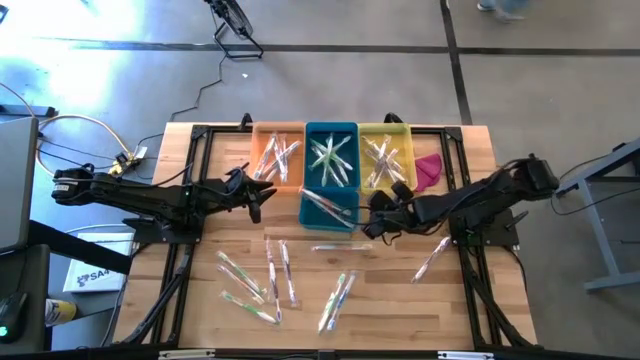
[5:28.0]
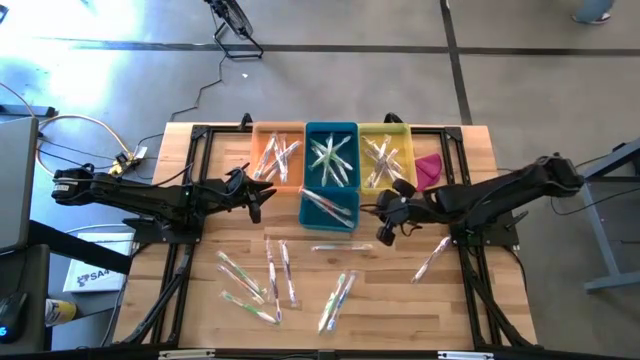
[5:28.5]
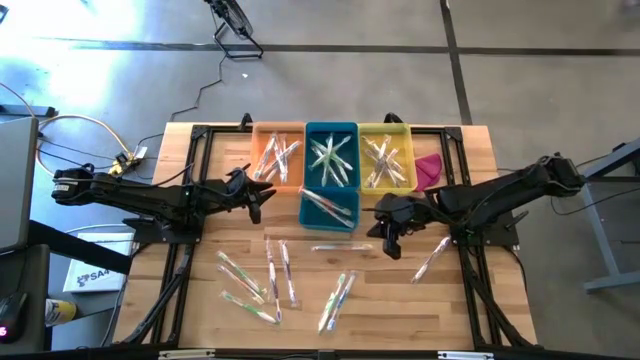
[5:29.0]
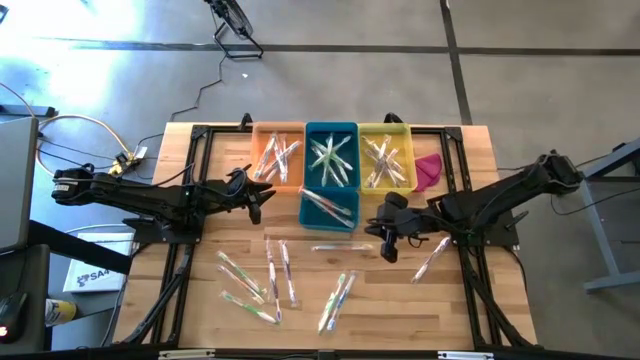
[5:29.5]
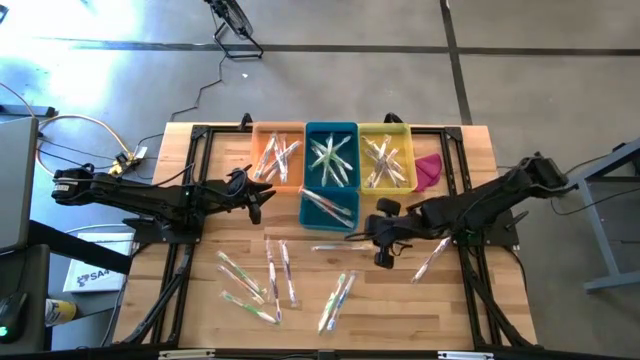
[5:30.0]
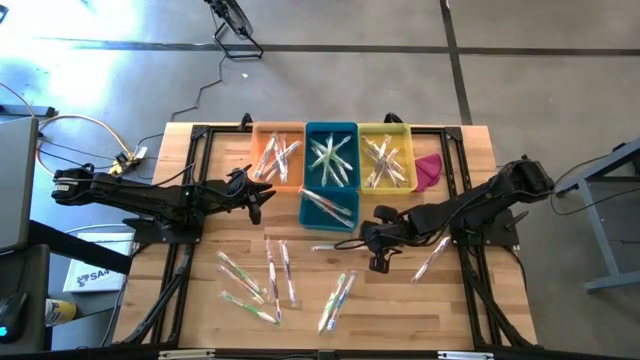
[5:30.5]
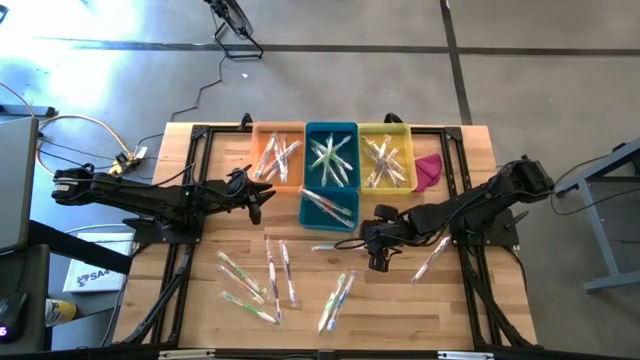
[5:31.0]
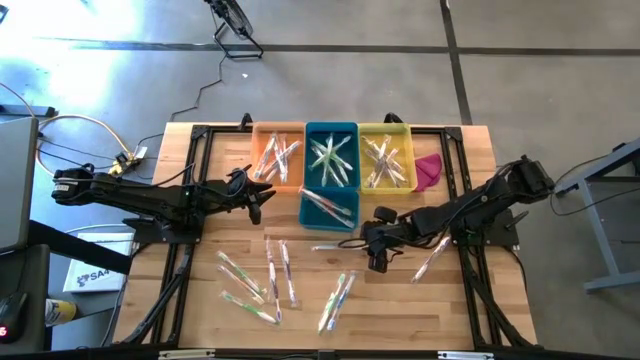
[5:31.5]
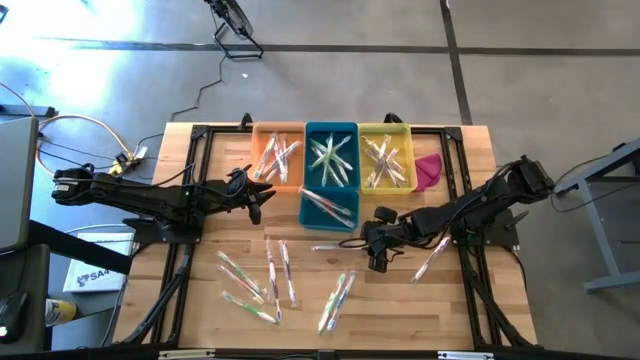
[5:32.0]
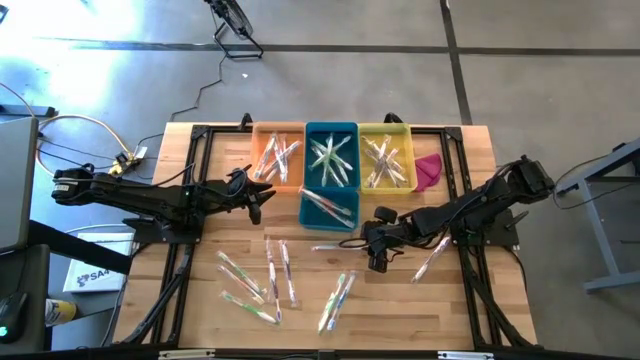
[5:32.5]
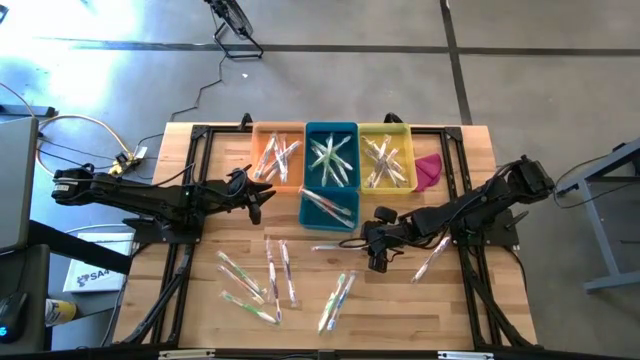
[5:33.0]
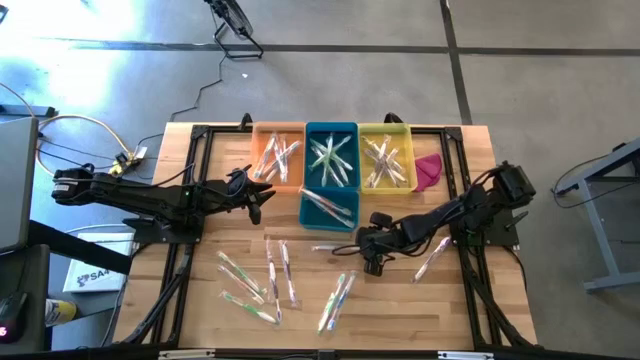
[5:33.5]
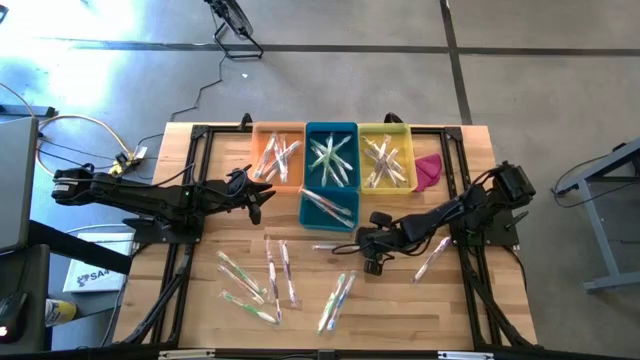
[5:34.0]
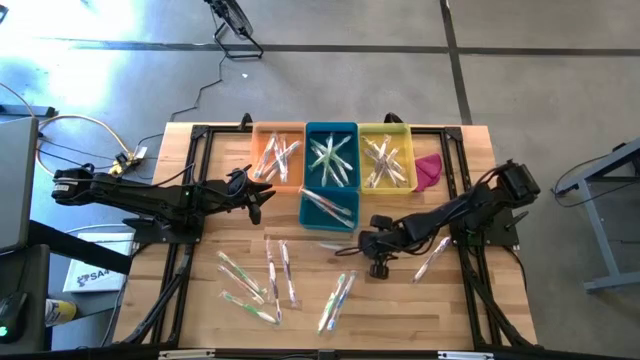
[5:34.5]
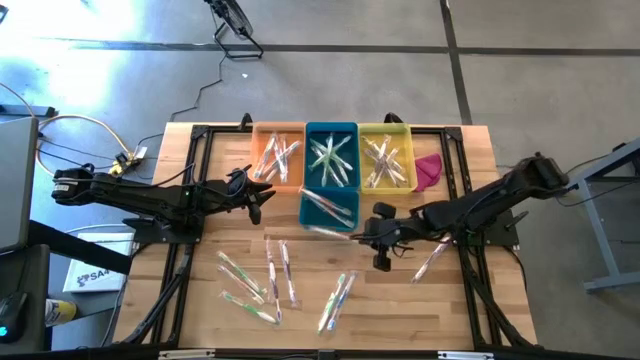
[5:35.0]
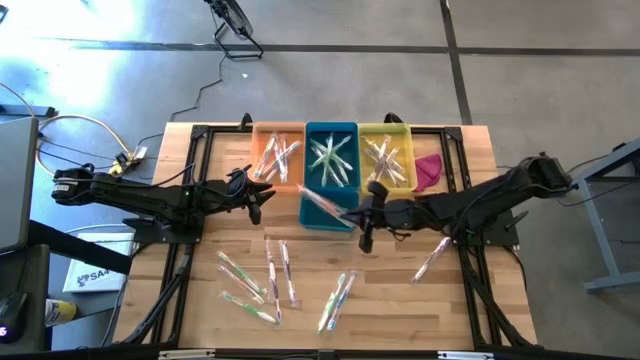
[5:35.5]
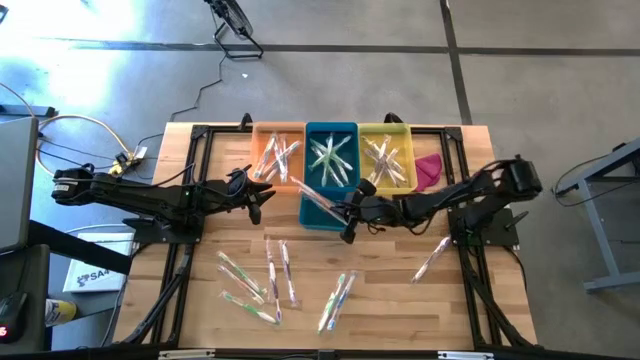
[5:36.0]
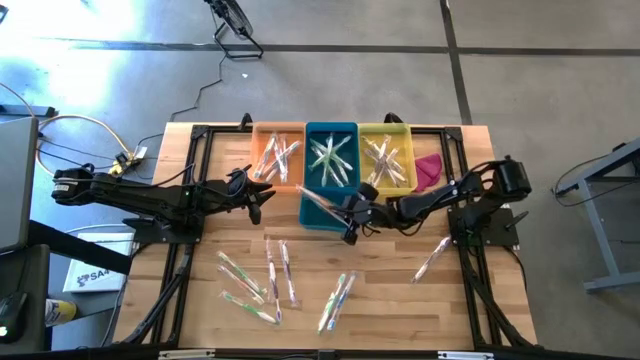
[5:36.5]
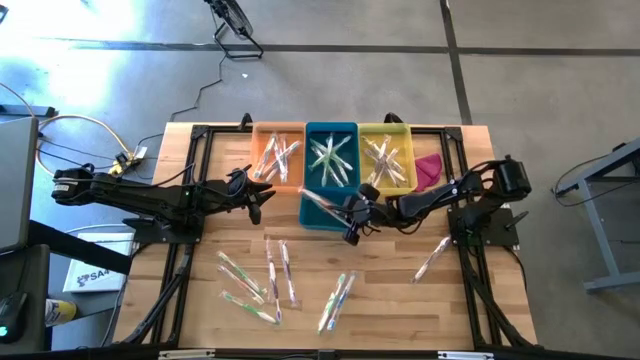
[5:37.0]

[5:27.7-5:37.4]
Task: Pick & Place Toothbrushes
Put the orange toothbrush into the bottom blue bin

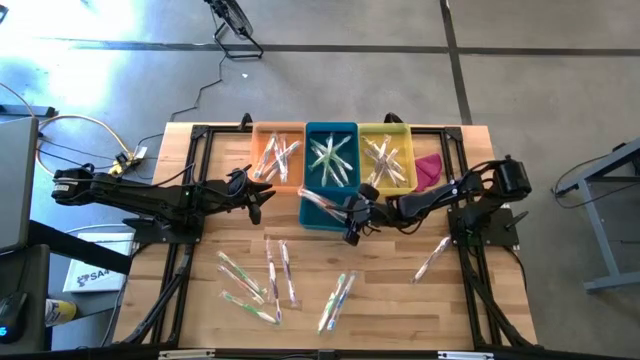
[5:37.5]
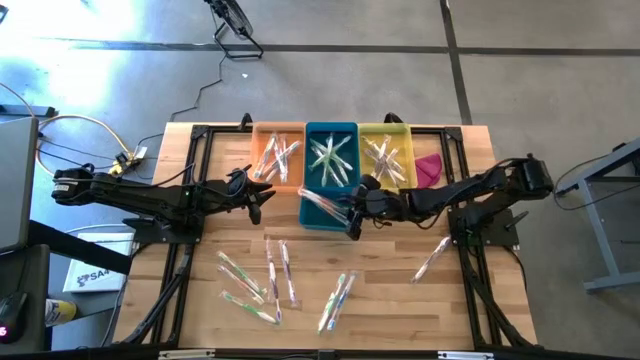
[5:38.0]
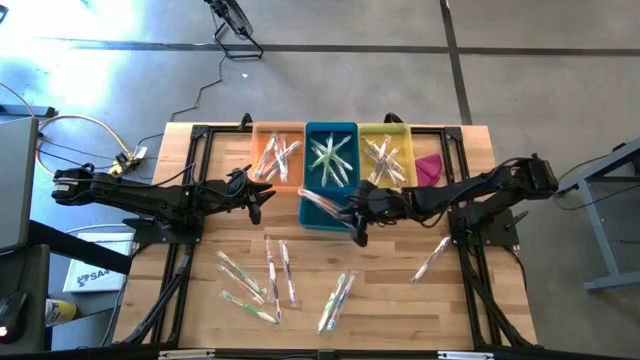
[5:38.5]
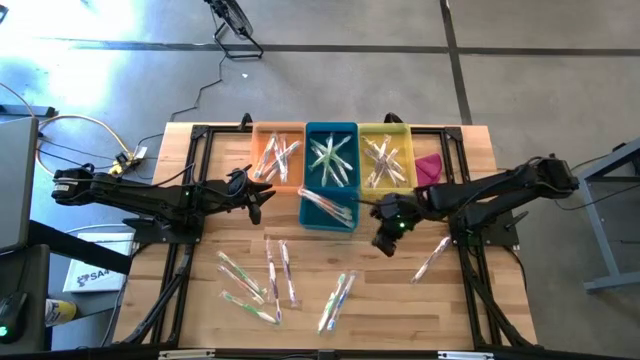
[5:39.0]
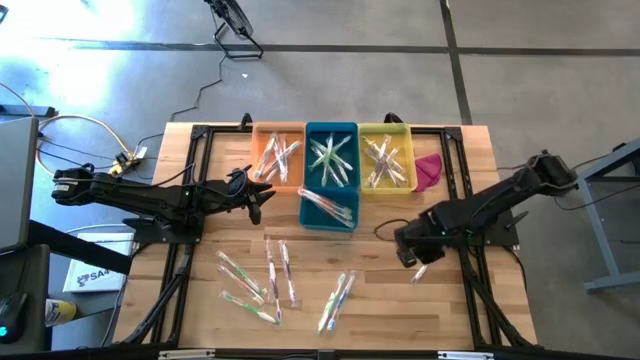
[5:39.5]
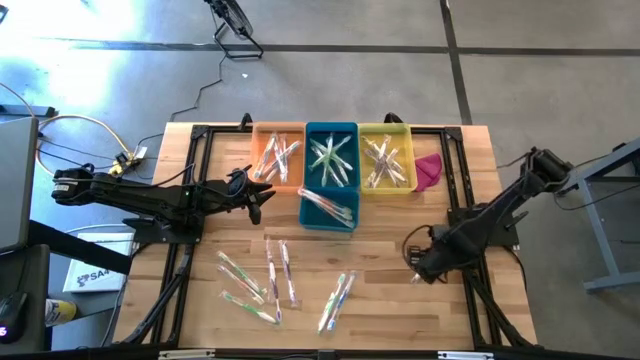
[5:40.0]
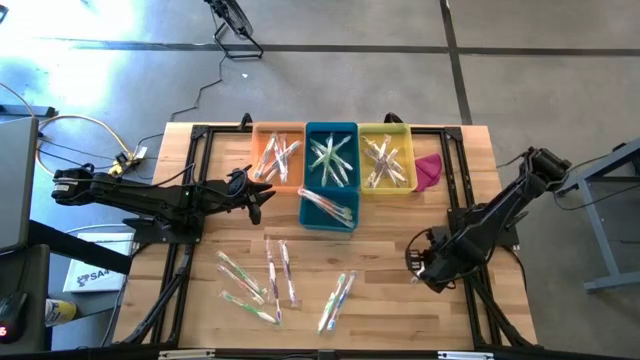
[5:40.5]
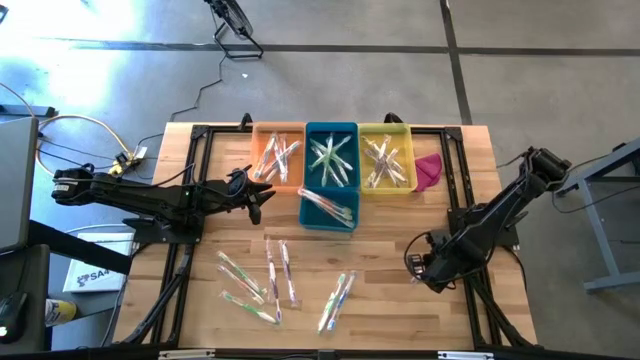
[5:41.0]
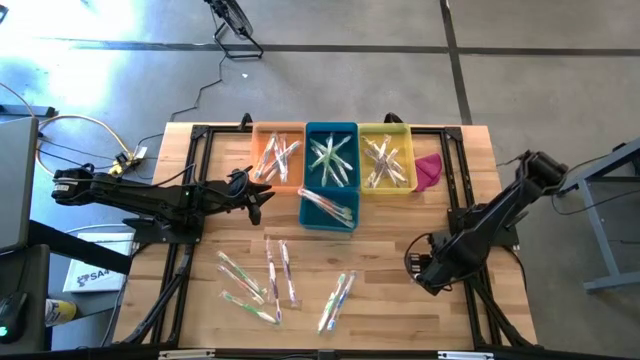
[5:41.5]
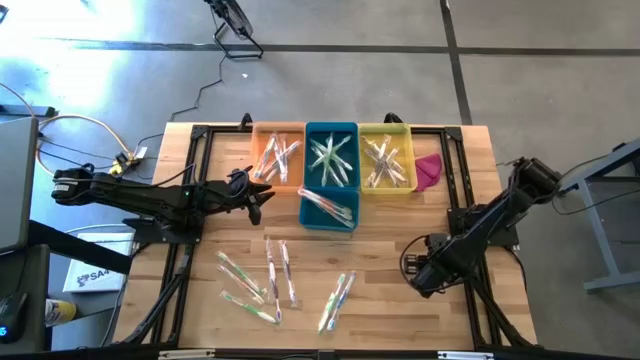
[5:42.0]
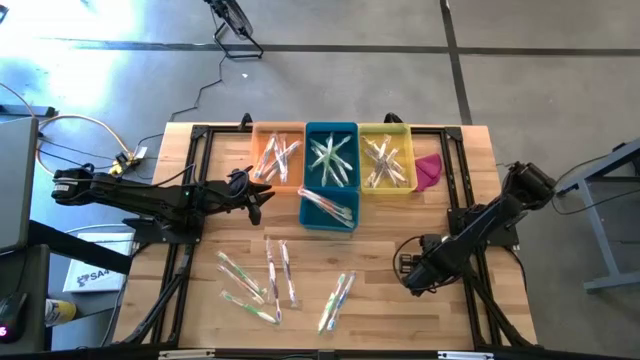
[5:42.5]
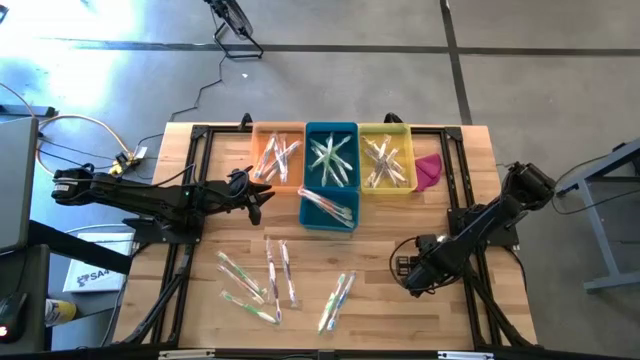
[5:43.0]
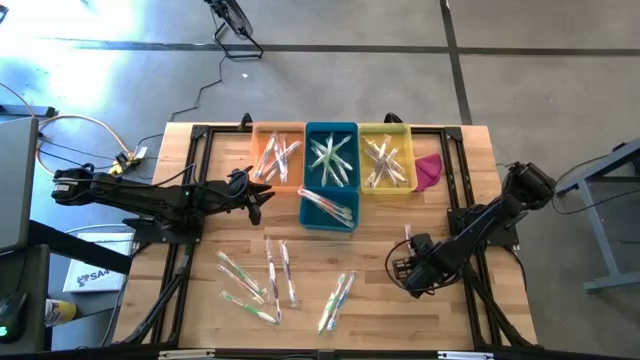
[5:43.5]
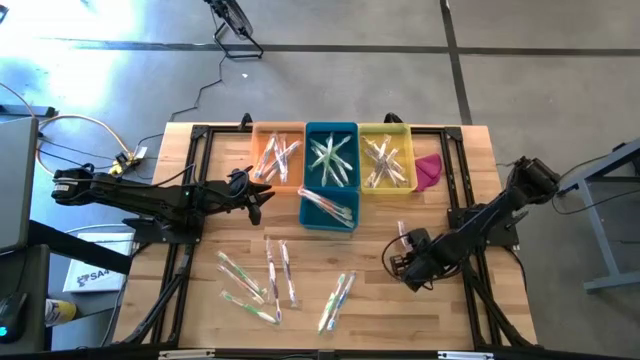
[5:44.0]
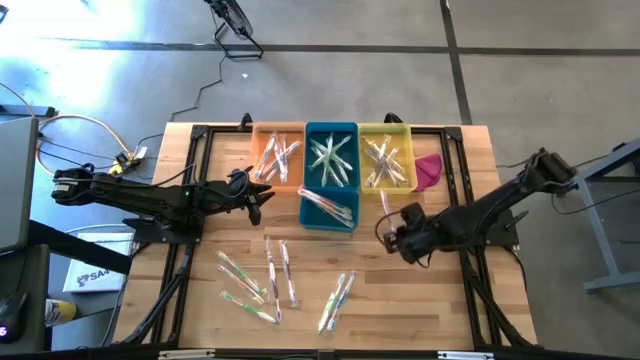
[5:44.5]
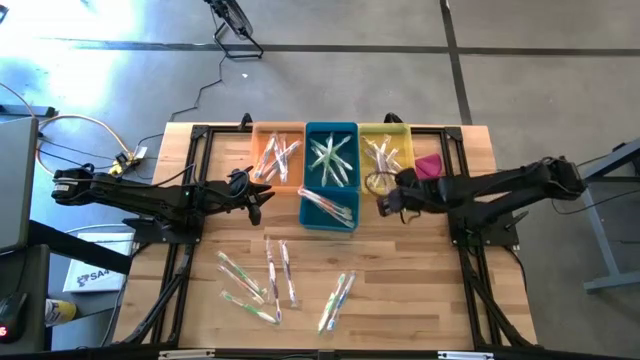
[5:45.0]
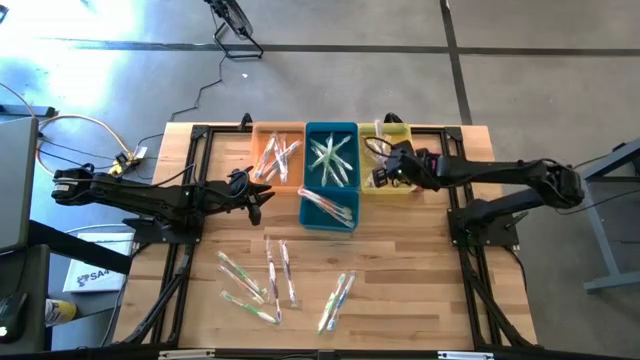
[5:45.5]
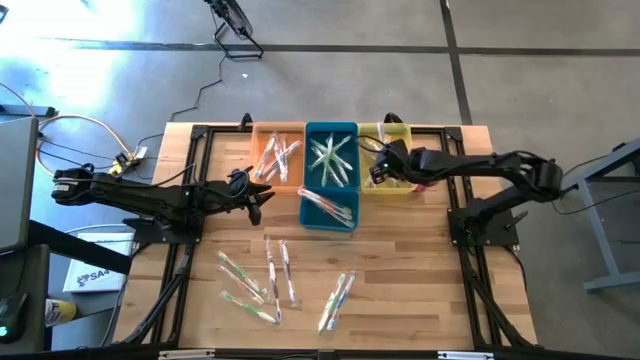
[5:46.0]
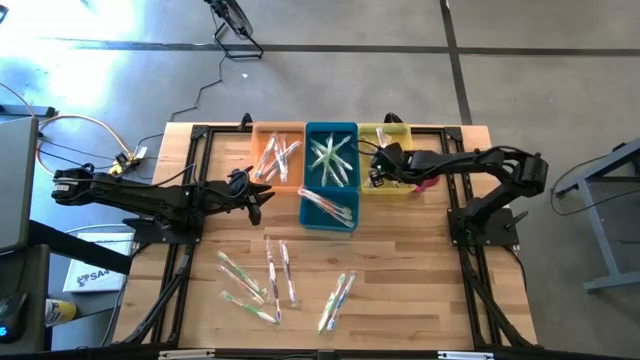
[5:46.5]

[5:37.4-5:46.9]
Put the violet toothbrush into the yellow bin

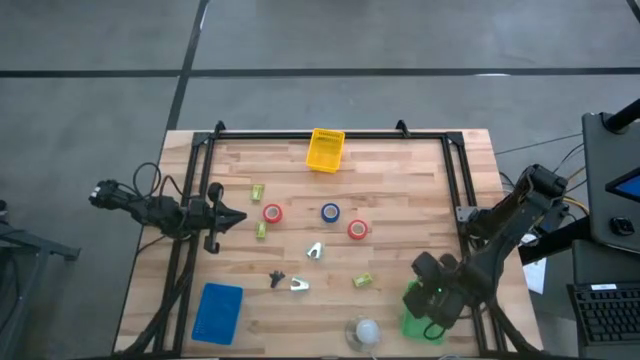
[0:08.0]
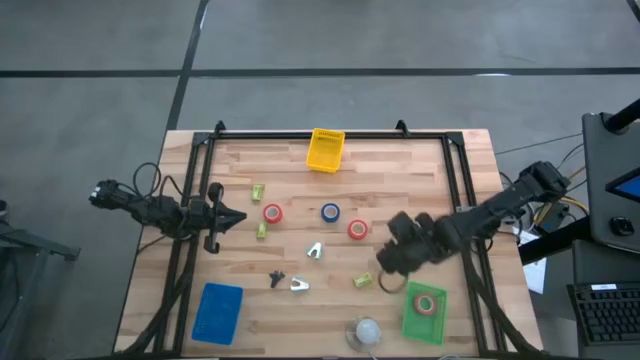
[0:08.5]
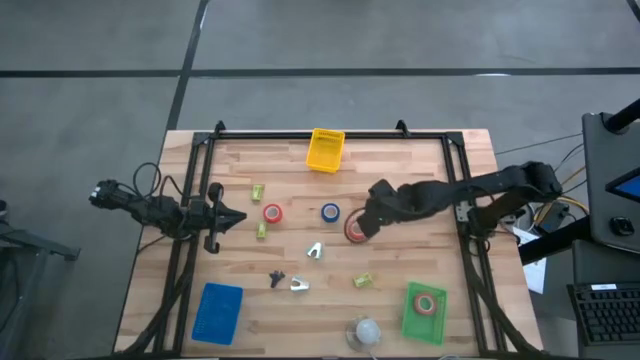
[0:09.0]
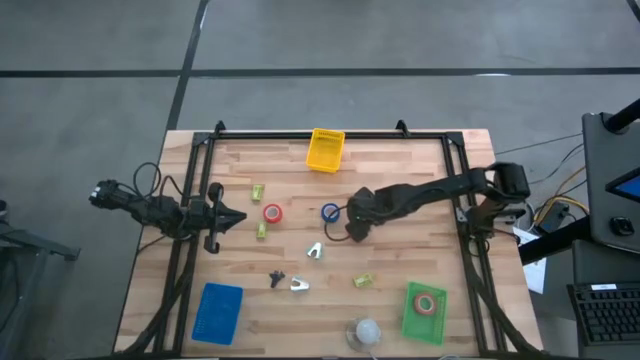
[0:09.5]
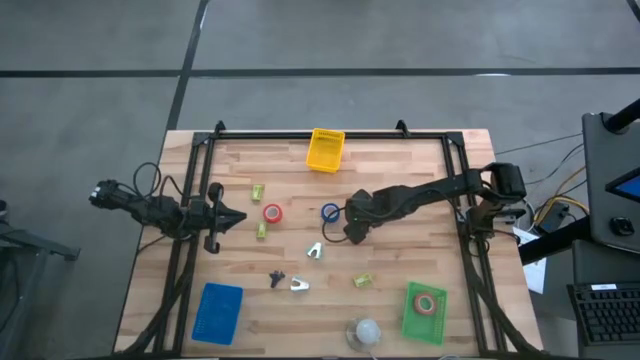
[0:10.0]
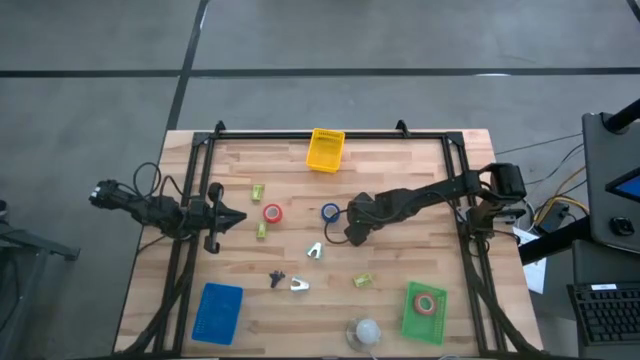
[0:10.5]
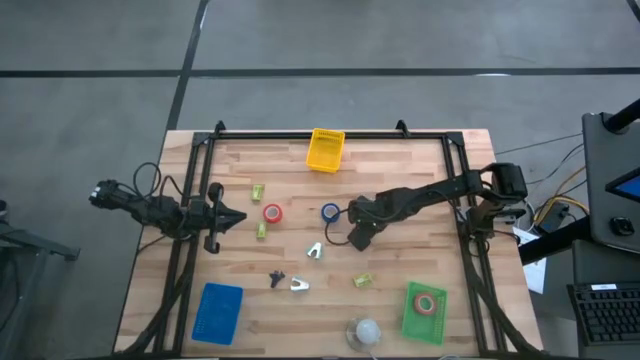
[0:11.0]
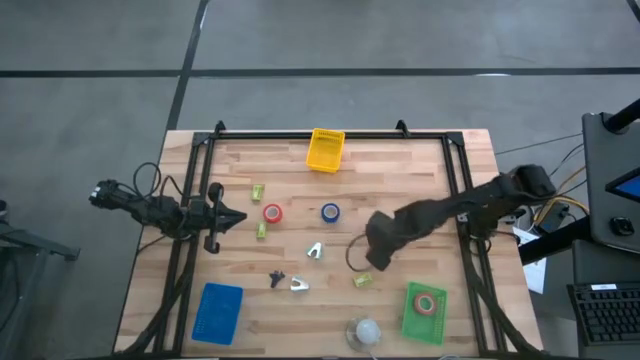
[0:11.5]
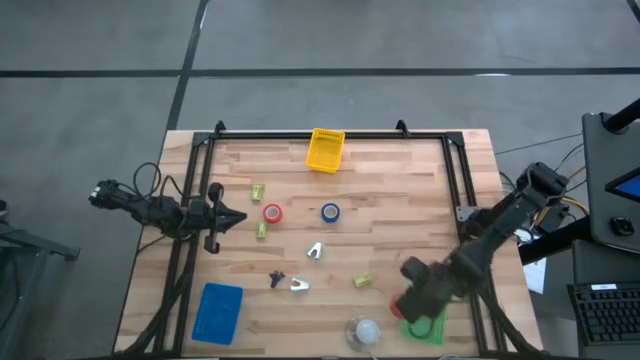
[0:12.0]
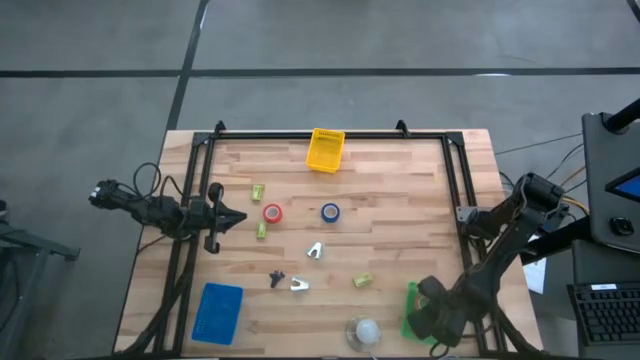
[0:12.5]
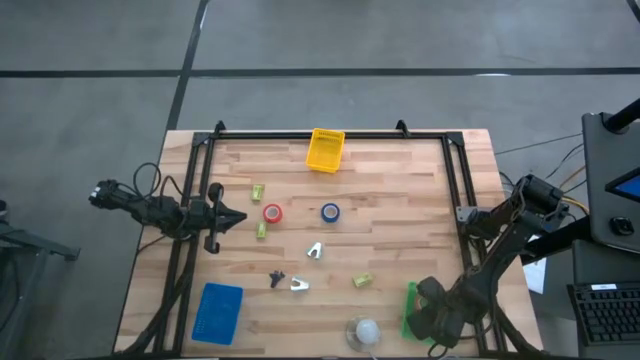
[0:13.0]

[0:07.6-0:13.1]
Task: Pick and place Stapler, Stapler remover, tape
Put the right red tape into the green bin
